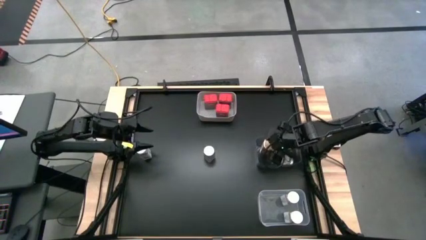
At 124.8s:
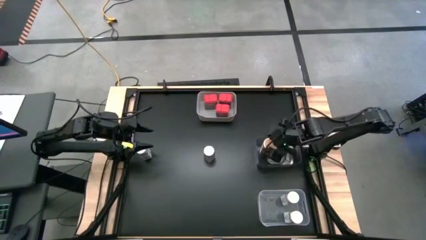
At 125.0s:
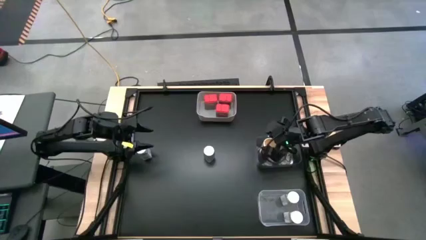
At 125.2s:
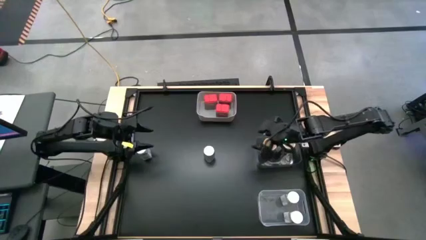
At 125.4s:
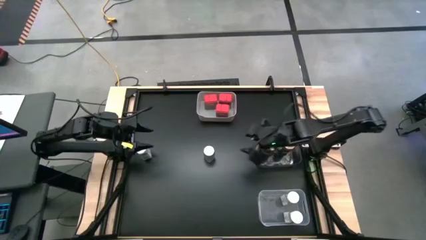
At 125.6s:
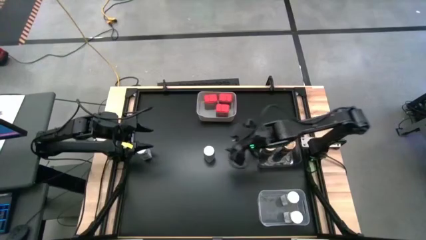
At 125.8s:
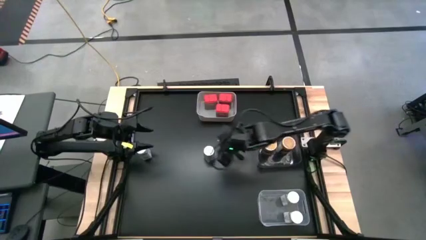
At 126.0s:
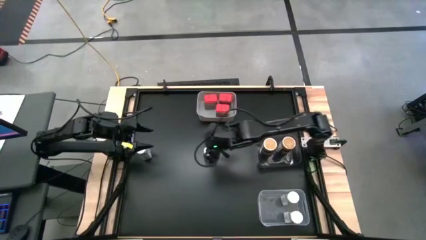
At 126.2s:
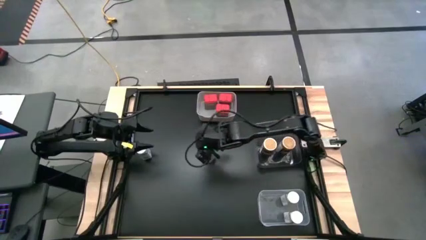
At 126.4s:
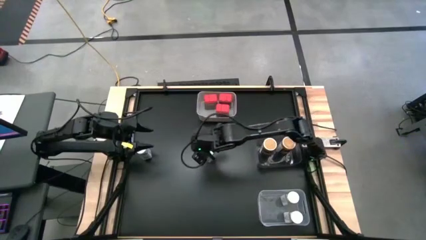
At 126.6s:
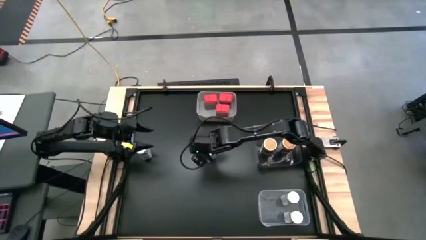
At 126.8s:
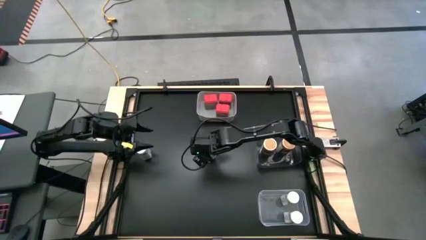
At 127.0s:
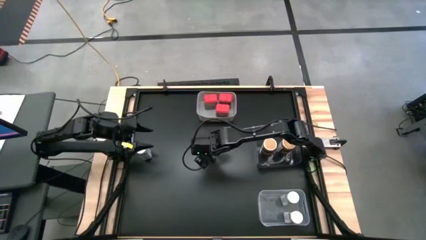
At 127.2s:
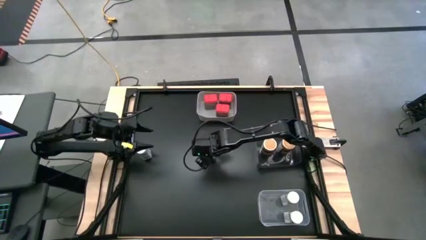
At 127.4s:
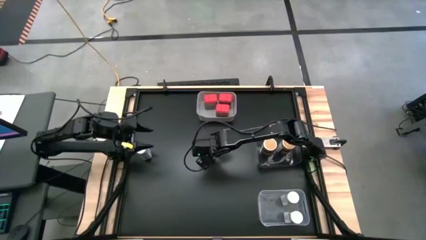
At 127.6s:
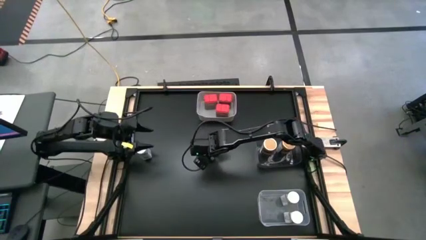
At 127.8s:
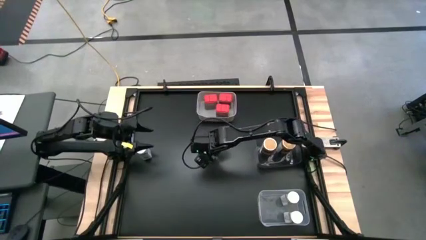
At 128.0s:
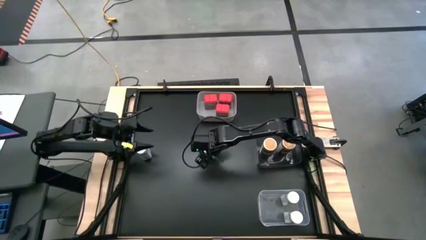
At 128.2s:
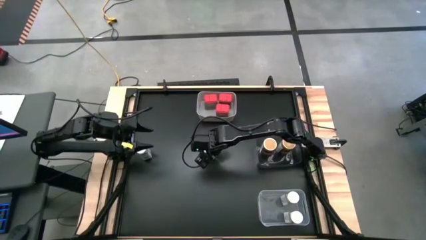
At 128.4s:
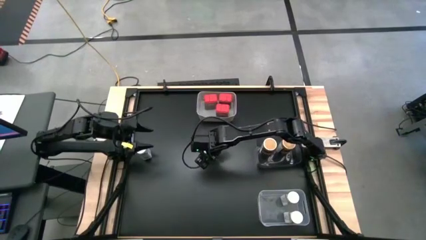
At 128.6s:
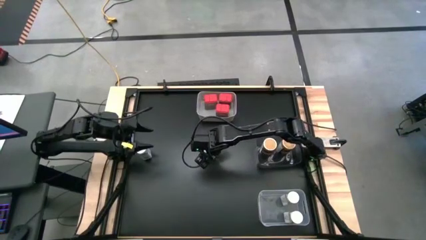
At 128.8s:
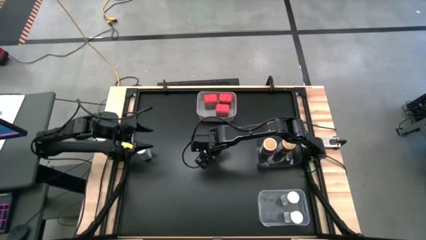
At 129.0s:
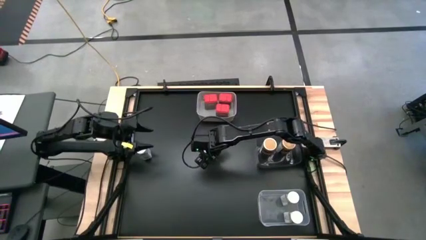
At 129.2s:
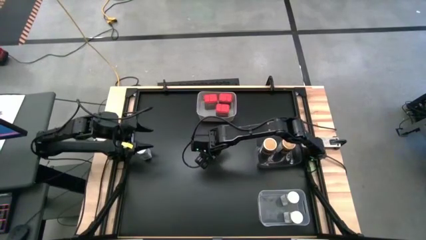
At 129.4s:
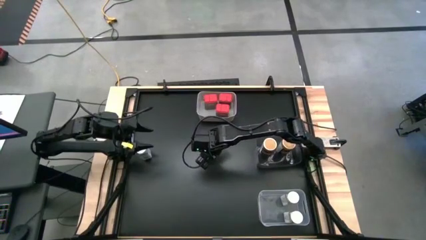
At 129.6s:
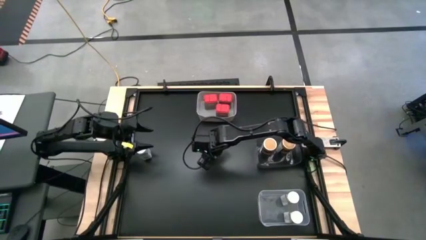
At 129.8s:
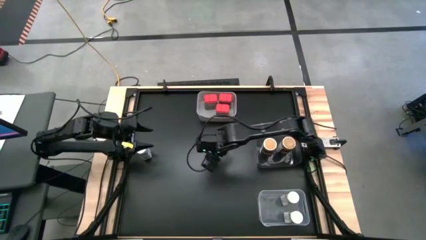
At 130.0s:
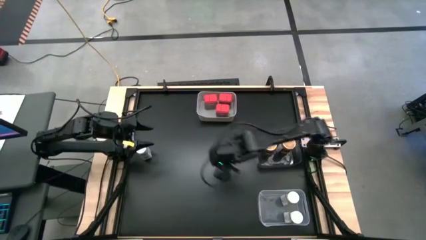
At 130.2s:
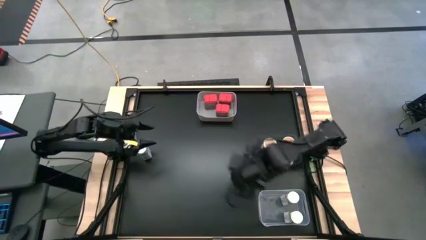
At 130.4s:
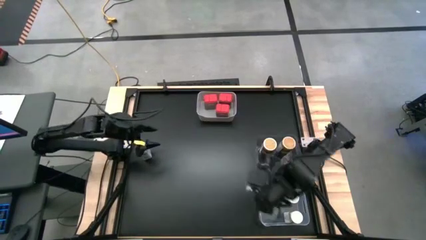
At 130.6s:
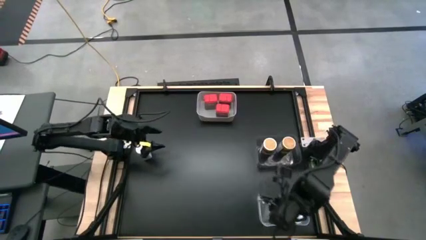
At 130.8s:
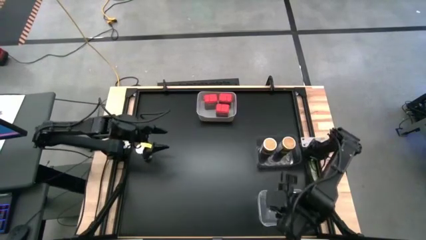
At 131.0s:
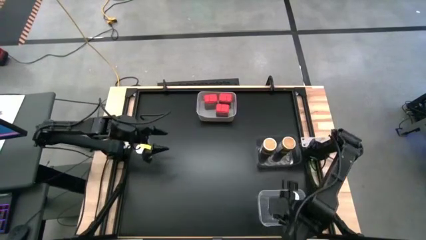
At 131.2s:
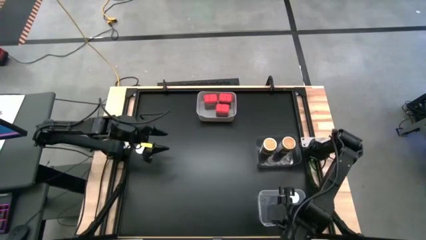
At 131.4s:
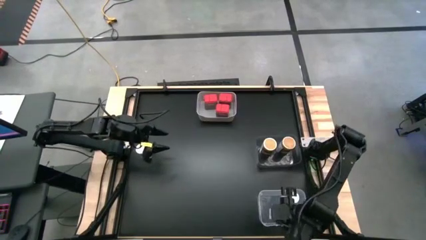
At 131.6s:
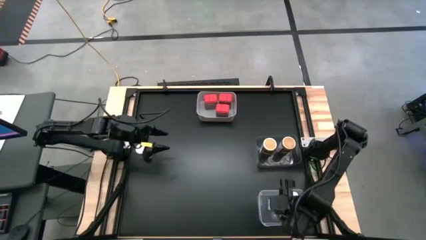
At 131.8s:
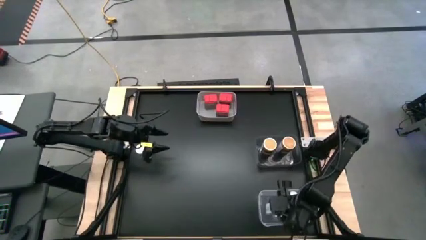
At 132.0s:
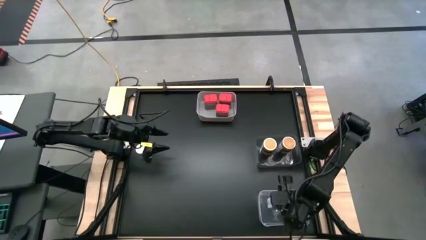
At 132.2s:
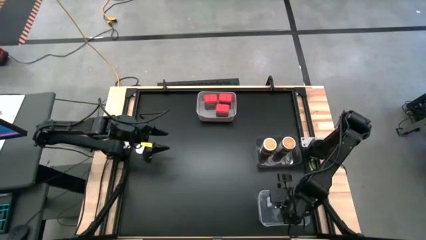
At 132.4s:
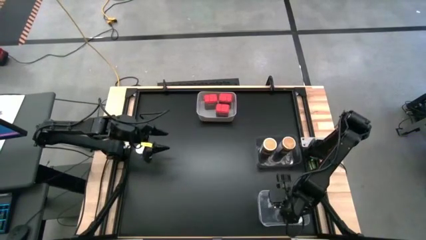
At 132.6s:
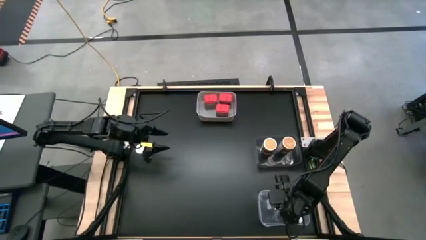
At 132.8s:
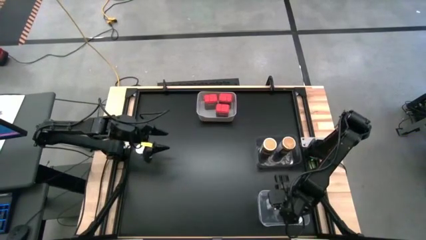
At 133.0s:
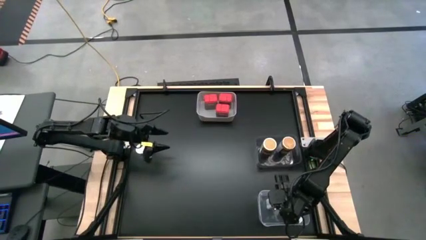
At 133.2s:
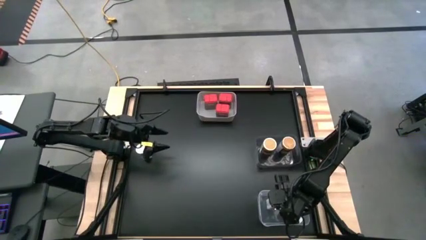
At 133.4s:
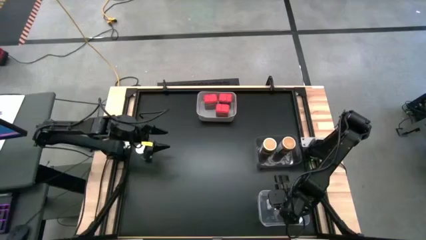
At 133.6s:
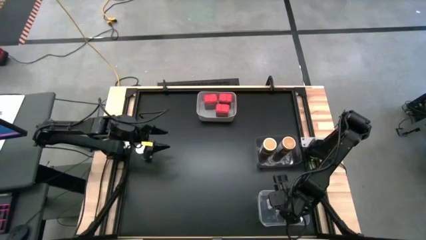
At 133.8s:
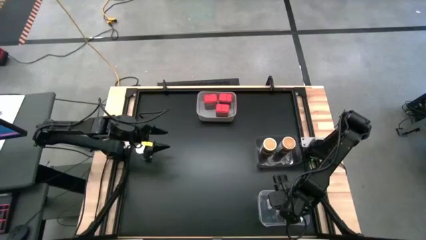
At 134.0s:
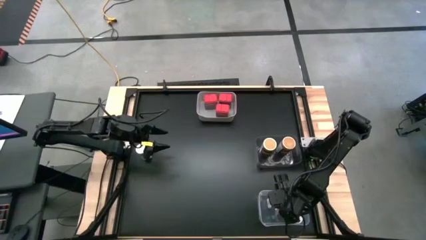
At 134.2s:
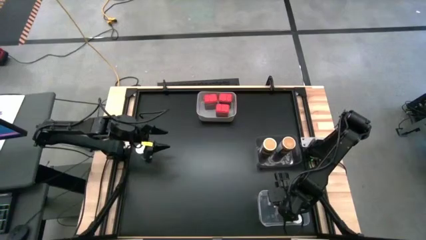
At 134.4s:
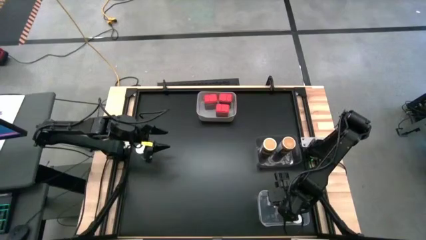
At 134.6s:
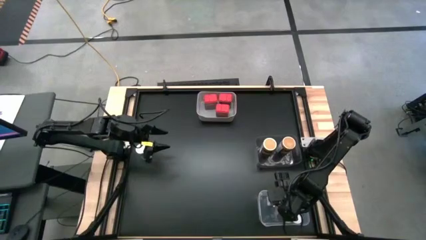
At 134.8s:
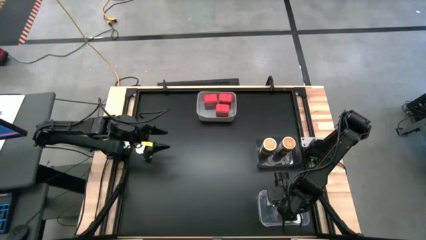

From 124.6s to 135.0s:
Task: Sort spices by type
Put the right white seasoning bottle into the transparent bin

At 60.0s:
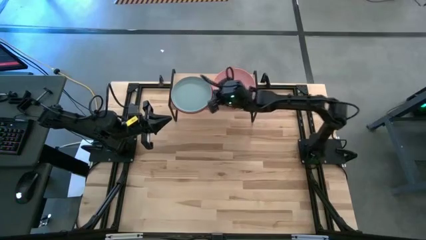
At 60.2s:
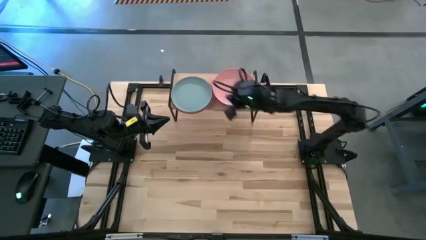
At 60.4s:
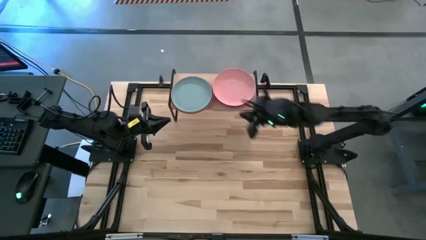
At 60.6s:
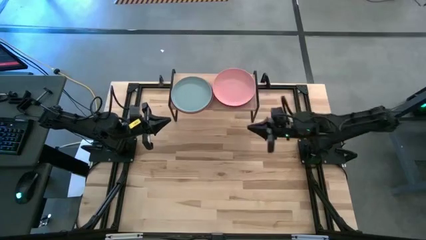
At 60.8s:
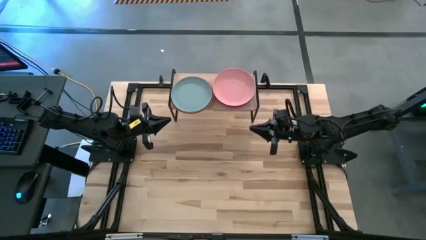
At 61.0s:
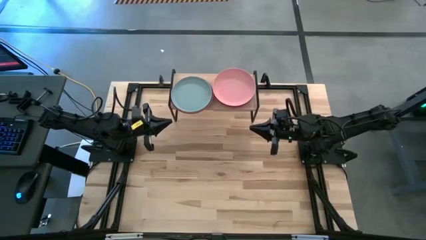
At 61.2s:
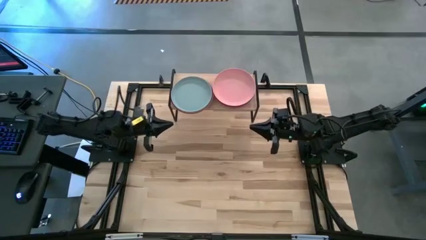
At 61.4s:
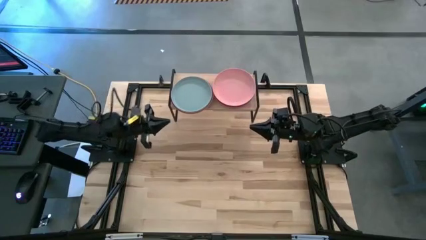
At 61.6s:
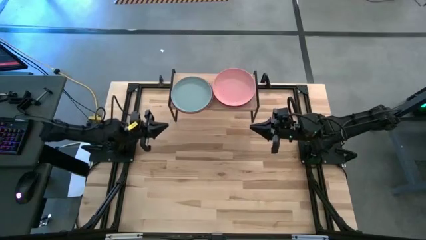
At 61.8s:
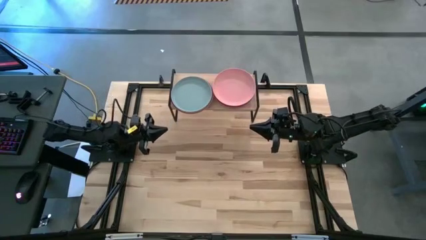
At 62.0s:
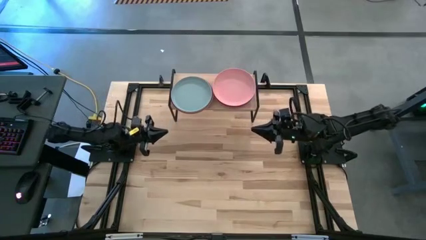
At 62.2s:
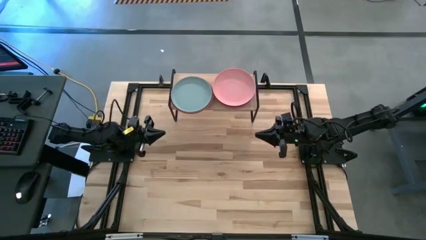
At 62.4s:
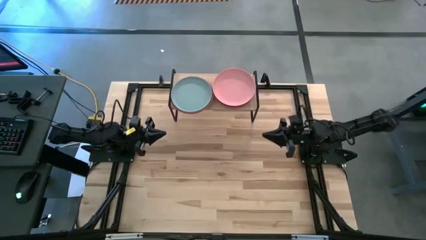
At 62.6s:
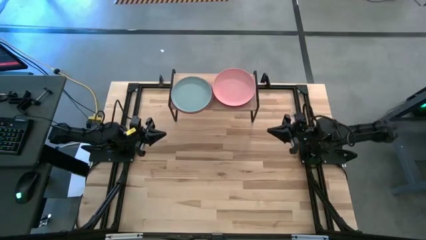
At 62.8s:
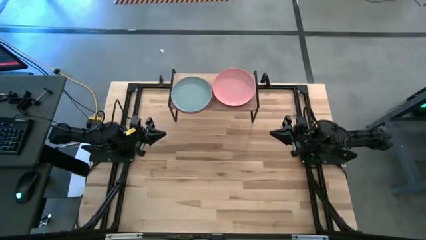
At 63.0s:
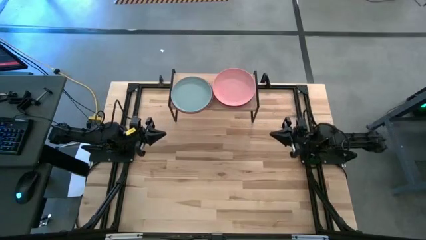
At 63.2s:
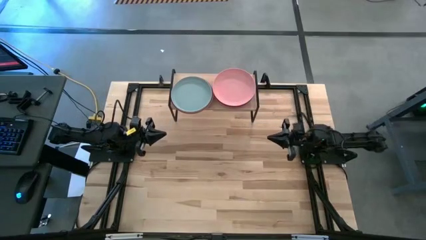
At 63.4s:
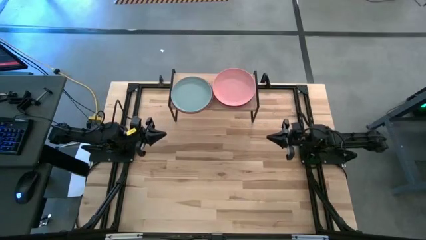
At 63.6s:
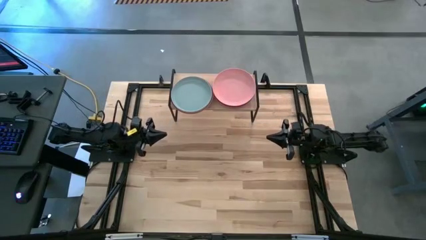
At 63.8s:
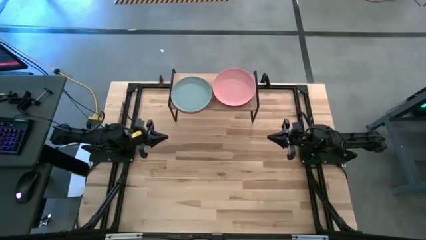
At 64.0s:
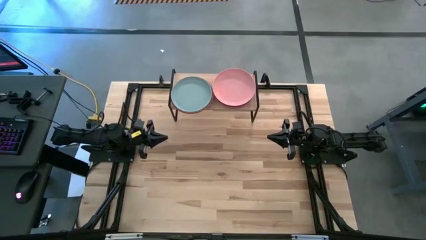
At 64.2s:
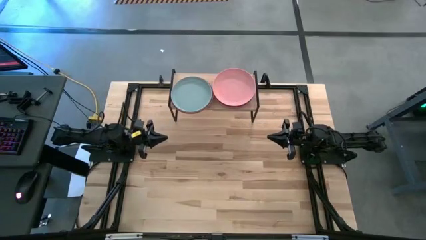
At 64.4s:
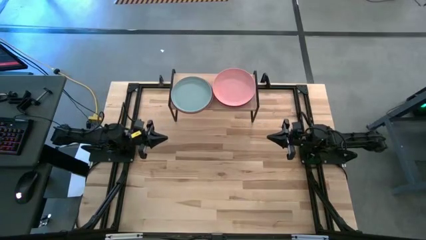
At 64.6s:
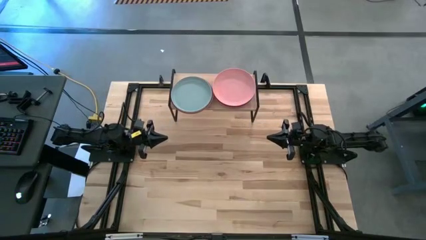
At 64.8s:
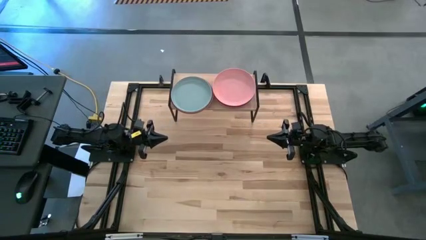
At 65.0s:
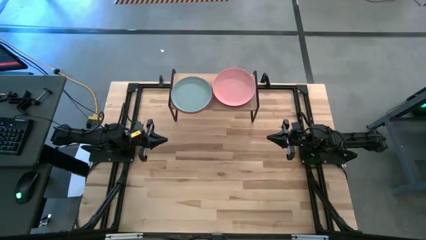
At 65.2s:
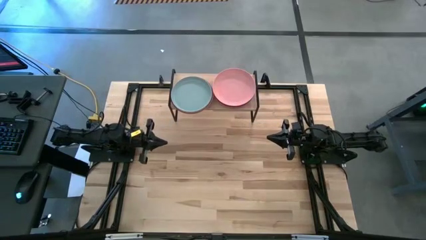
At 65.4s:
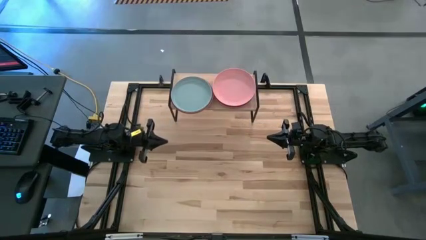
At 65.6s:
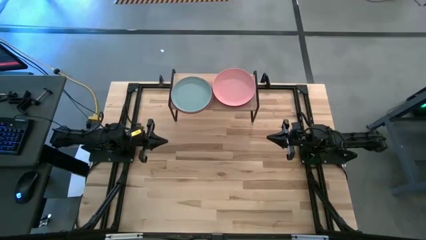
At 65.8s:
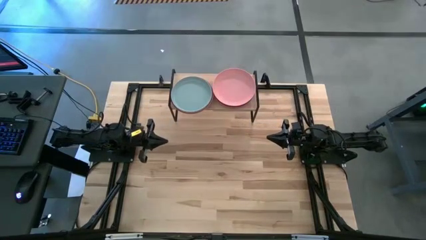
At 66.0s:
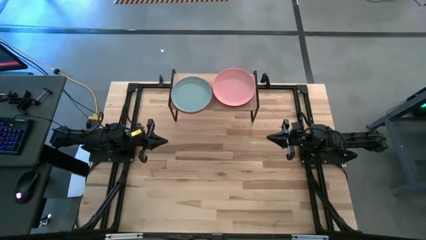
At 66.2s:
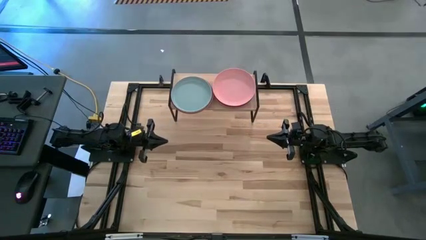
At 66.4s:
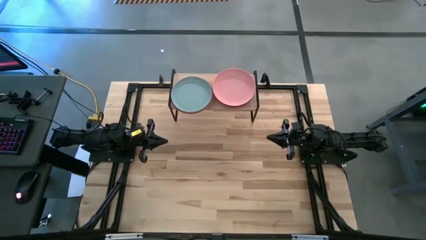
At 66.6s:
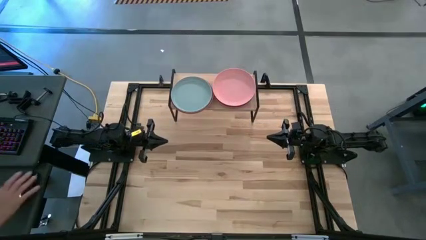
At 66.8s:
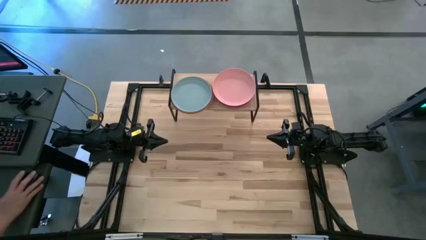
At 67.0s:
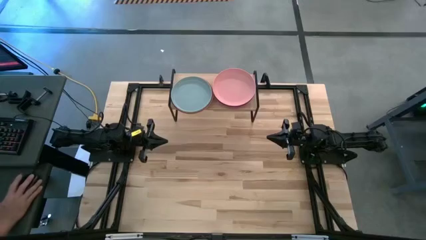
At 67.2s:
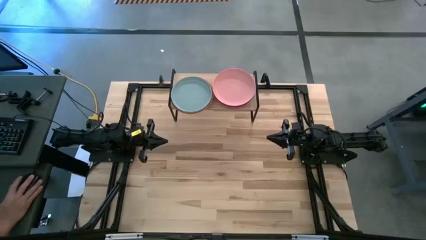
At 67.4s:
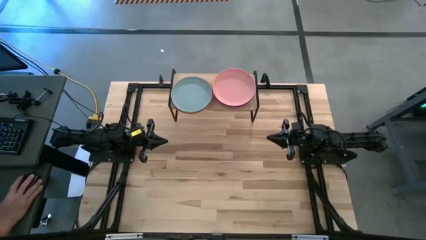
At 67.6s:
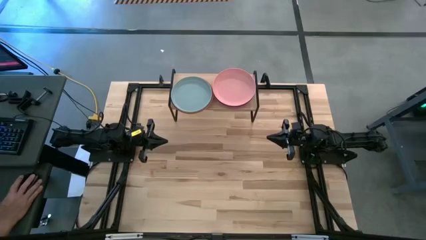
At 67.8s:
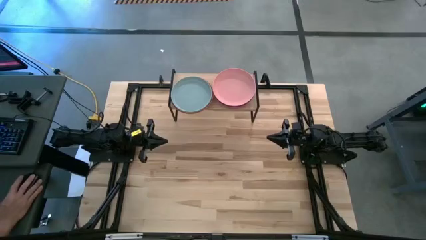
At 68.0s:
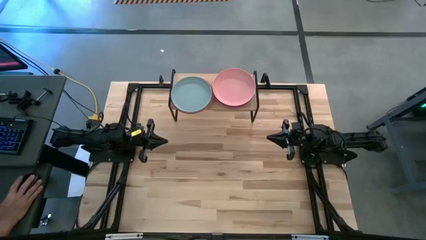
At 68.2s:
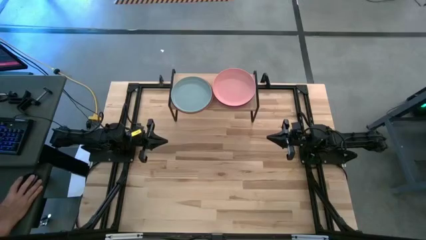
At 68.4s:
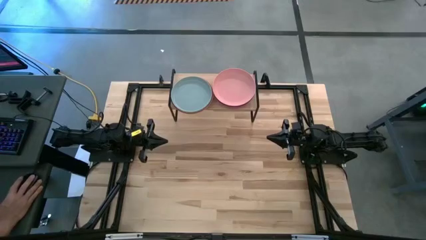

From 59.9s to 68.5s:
Task: Place and stack plates onto a shelf
Return to Home Position
